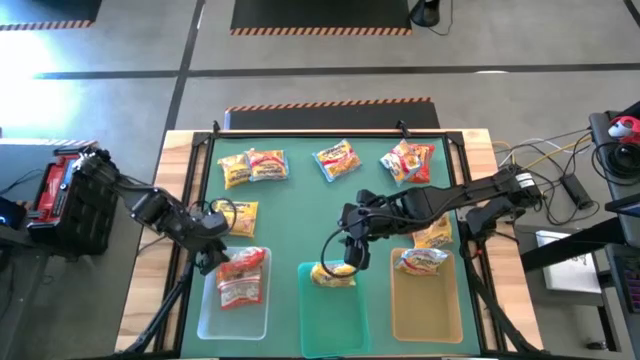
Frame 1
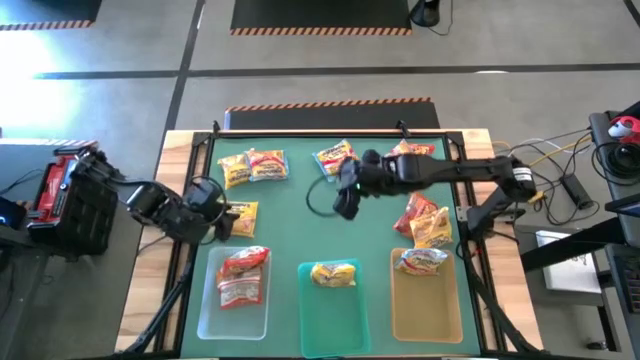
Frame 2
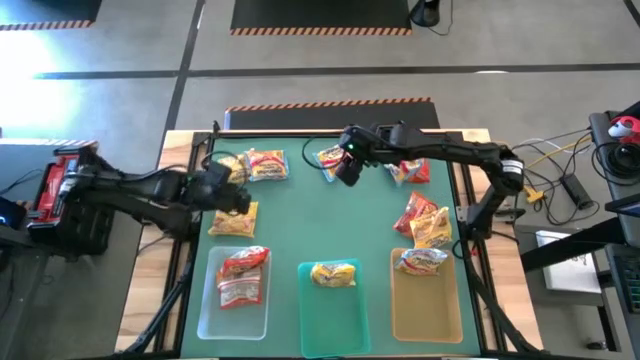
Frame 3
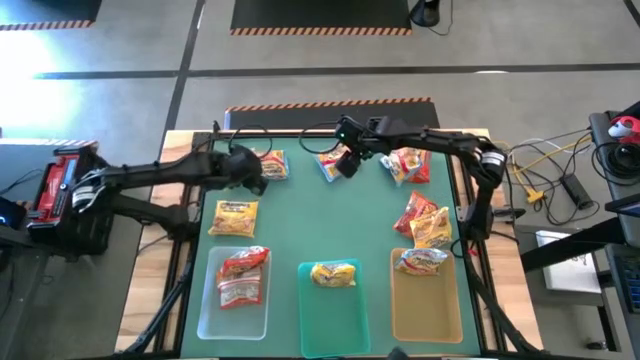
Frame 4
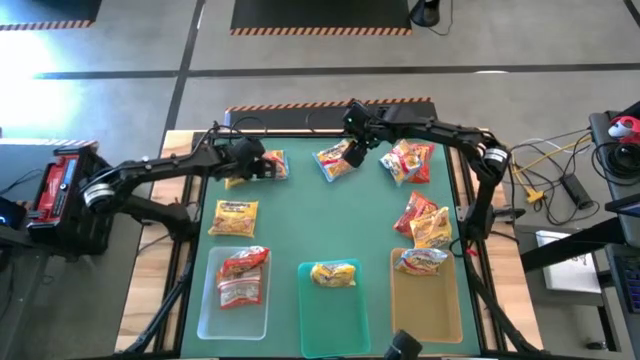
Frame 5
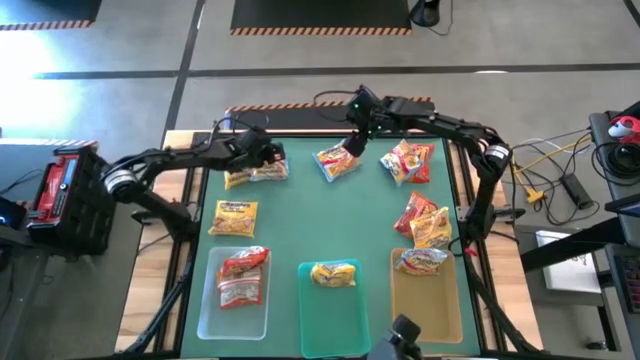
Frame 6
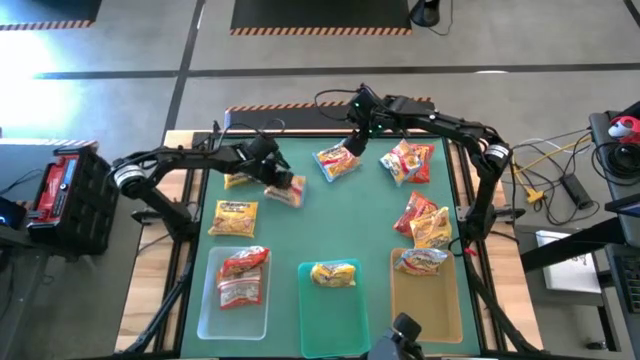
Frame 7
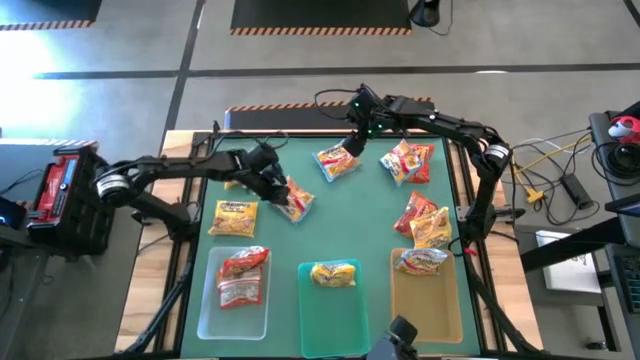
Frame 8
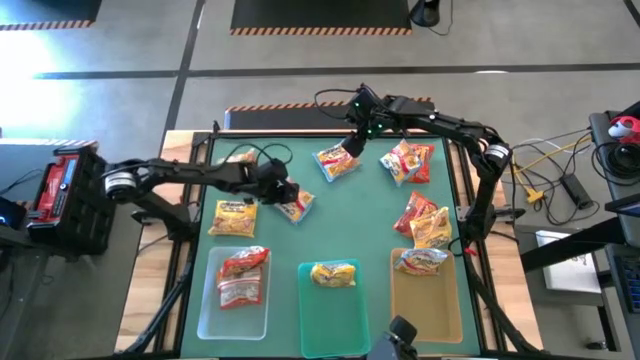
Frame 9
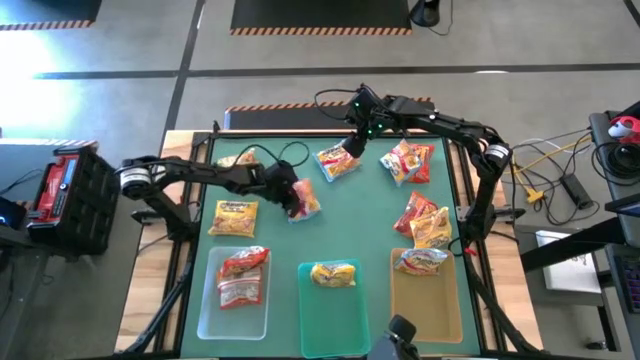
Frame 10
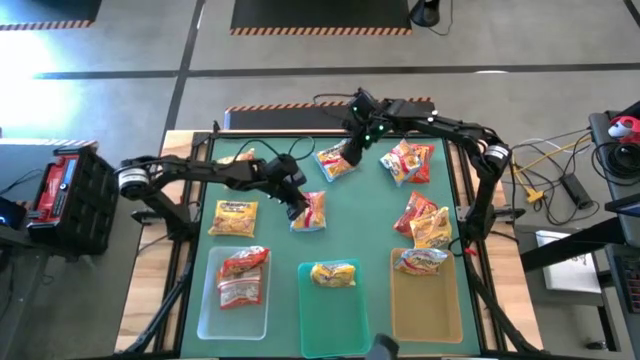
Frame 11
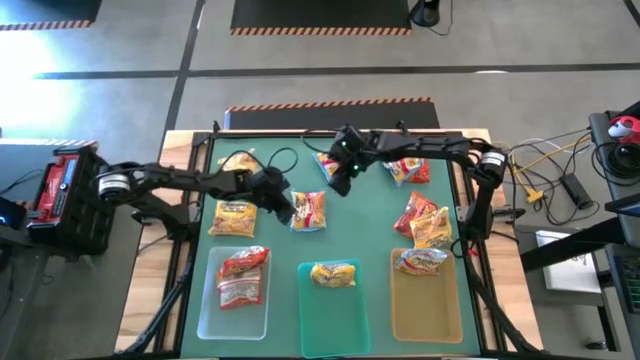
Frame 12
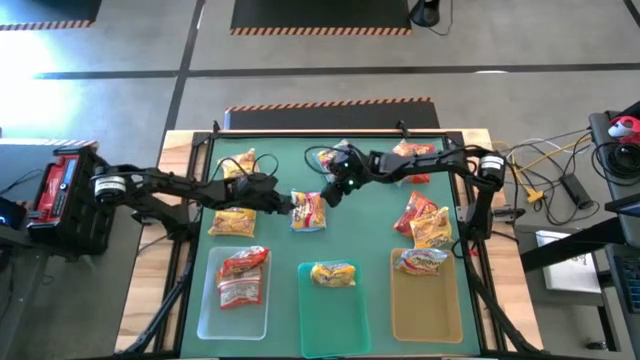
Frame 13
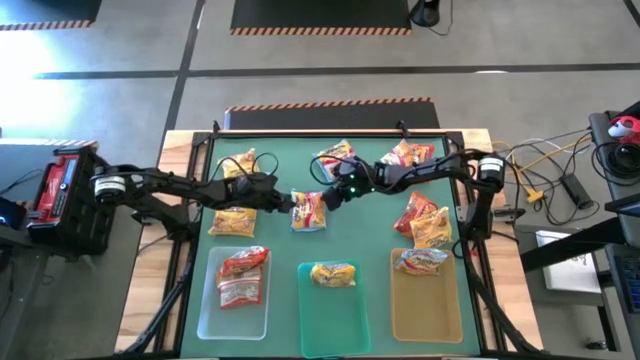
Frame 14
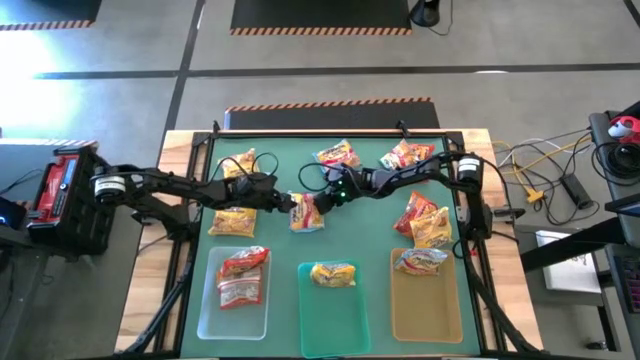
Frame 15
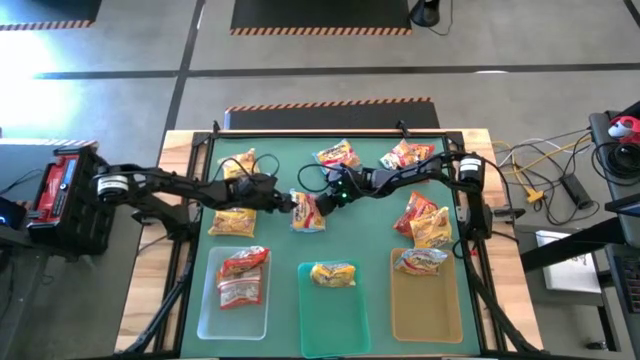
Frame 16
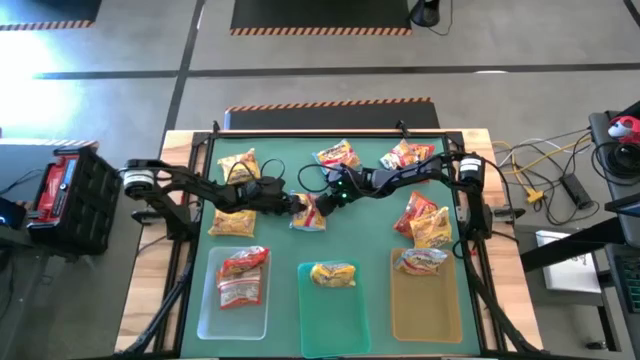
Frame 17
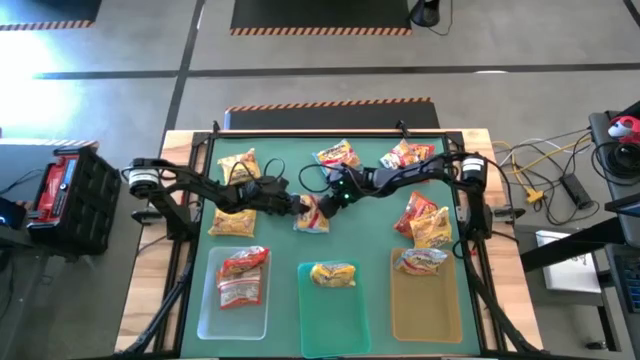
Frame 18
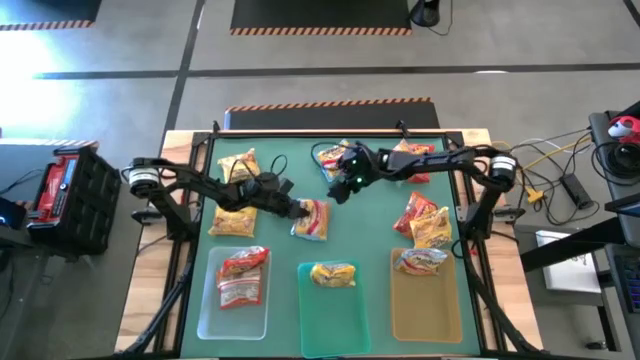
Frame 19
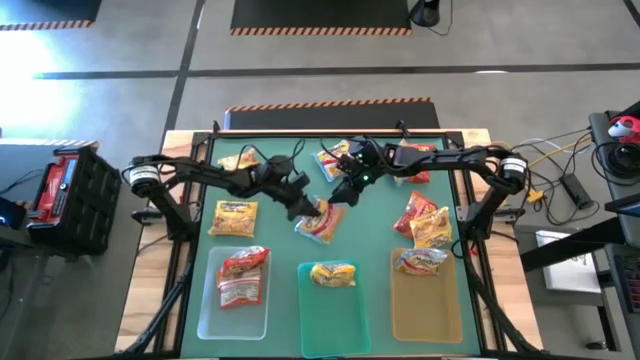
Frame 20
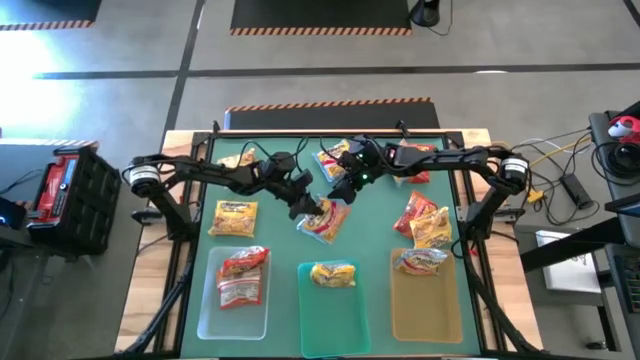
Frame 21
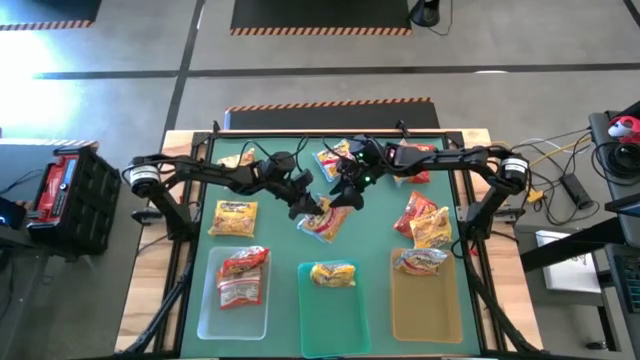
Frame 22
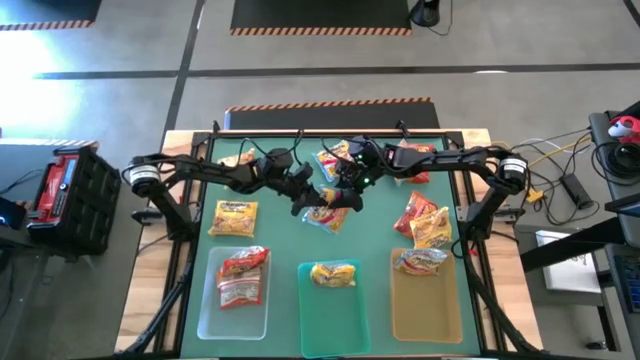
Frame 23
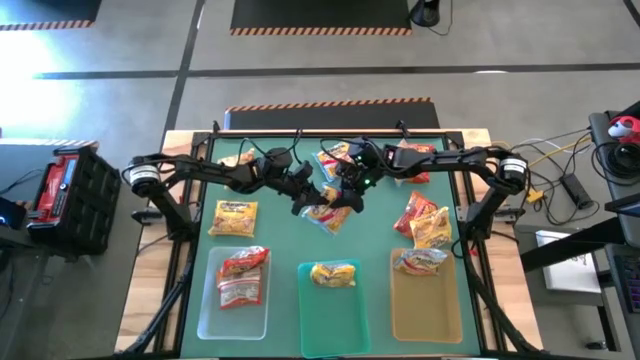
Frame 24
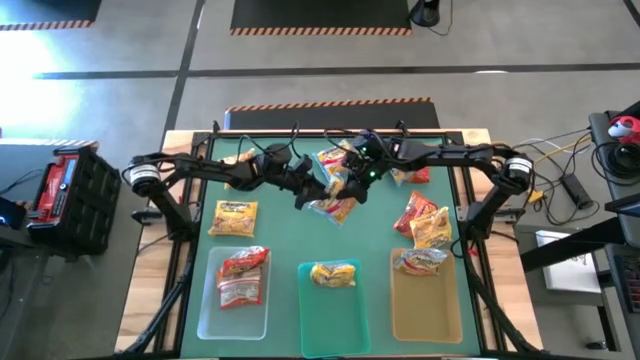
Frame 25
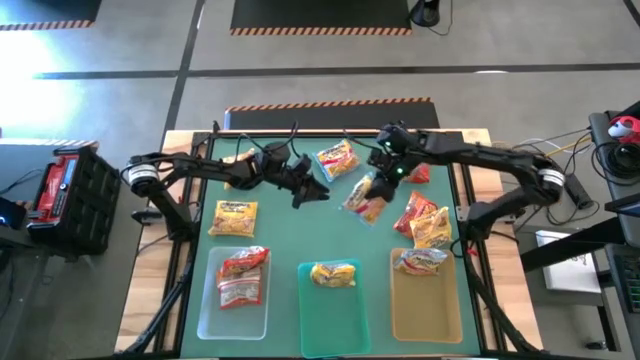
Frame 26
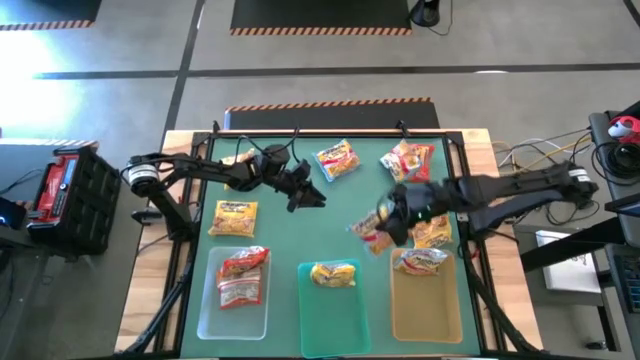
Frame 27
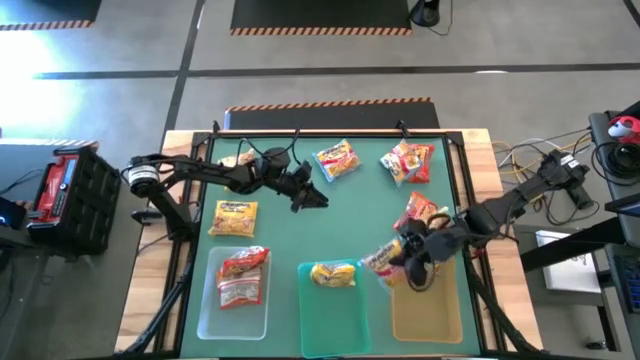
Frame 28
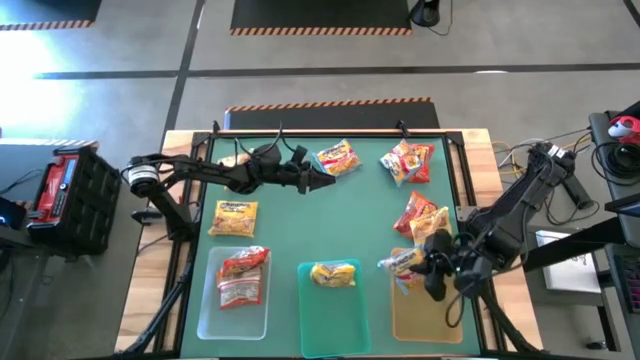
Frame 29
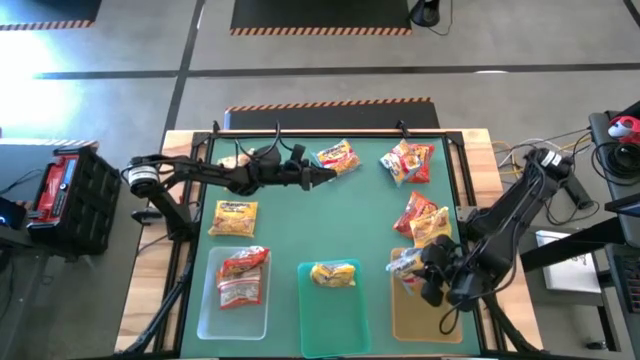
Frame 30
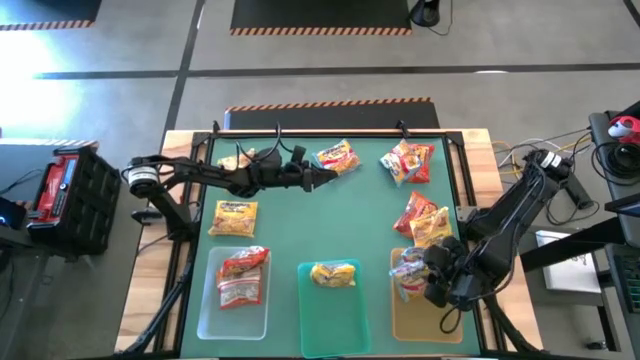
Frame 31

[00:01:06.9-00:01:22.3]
Task: Sort Maruchan noodles
Put the blue noodle pack into the yellow bin

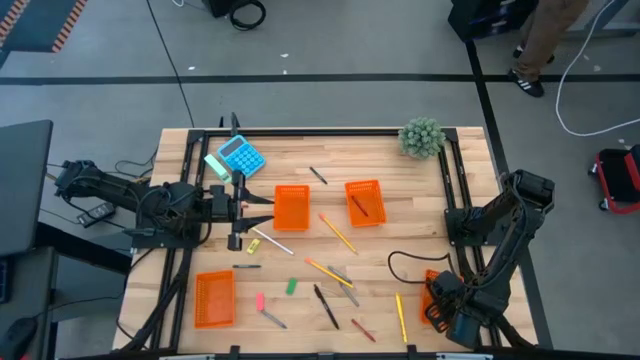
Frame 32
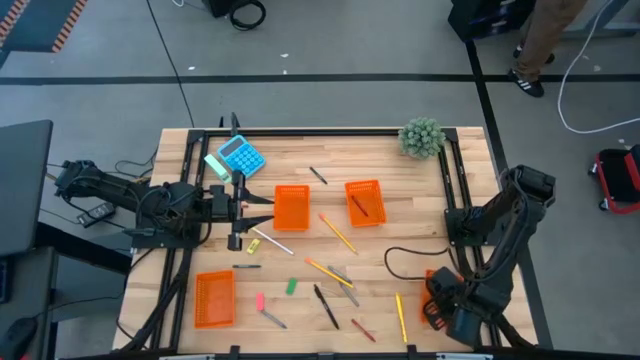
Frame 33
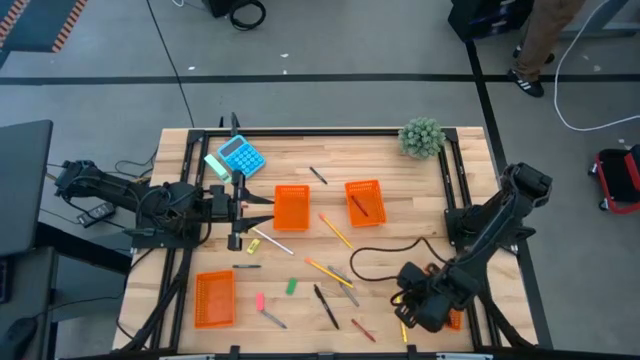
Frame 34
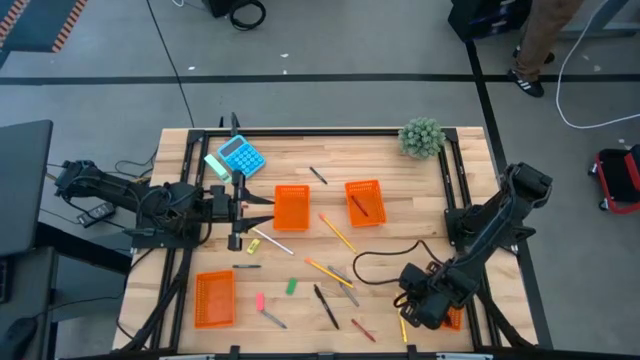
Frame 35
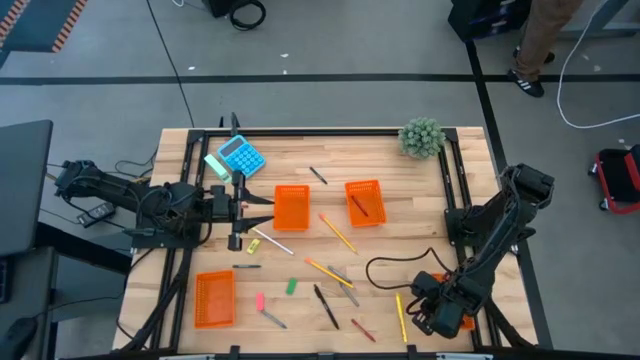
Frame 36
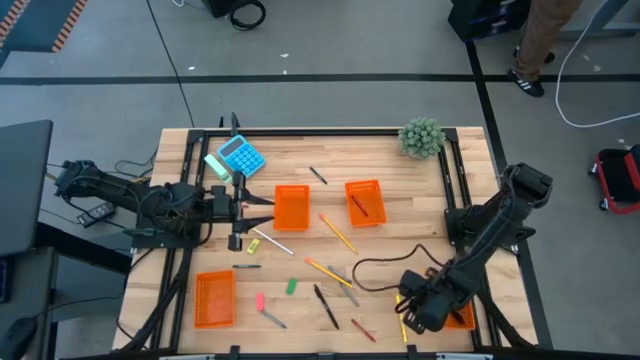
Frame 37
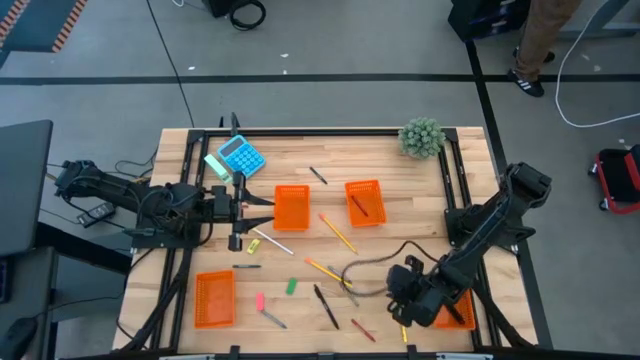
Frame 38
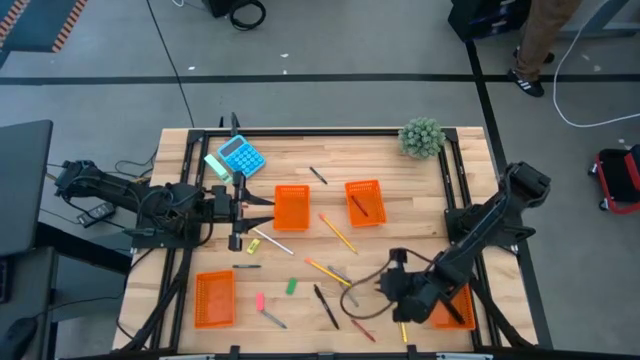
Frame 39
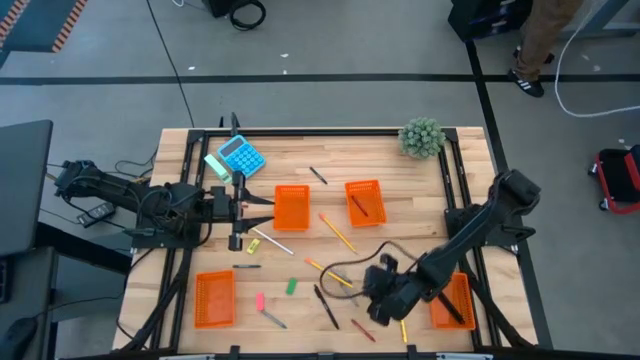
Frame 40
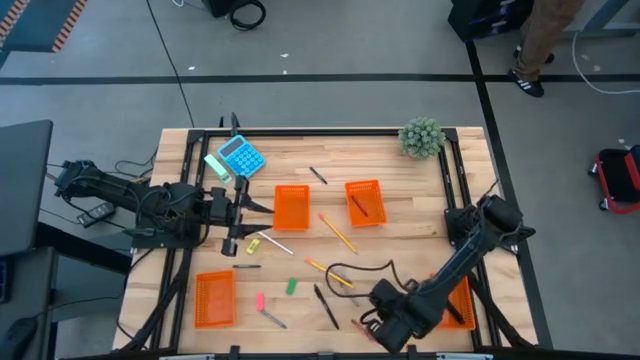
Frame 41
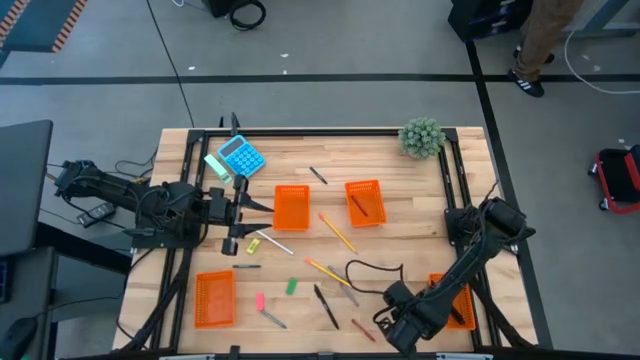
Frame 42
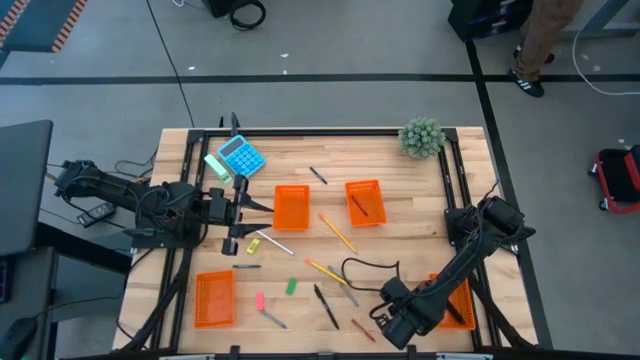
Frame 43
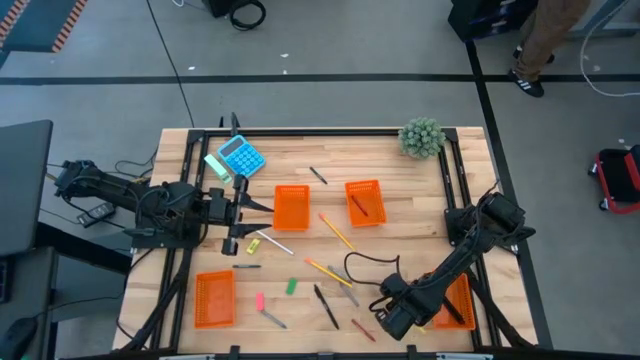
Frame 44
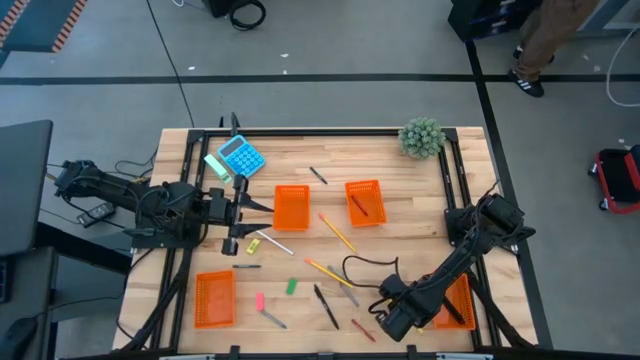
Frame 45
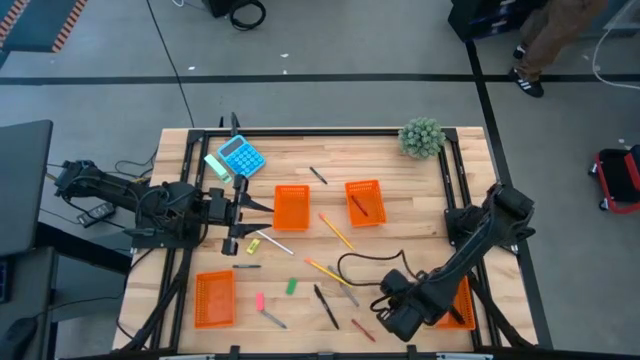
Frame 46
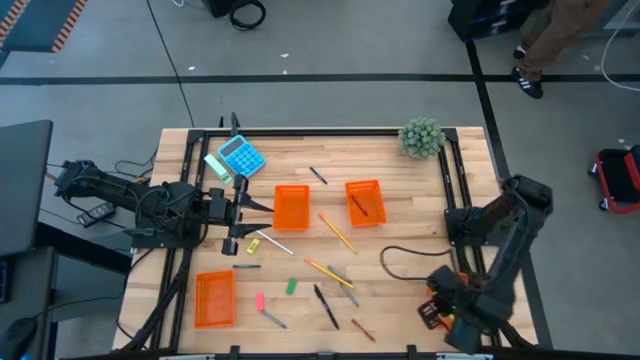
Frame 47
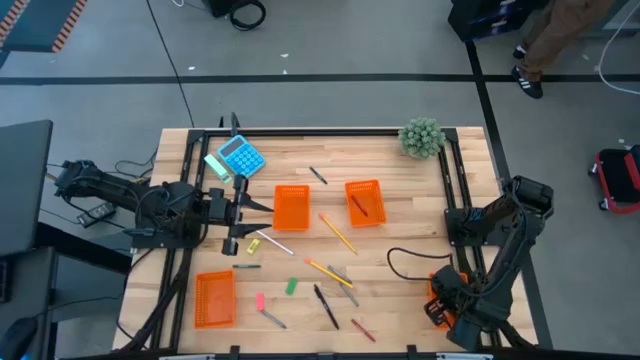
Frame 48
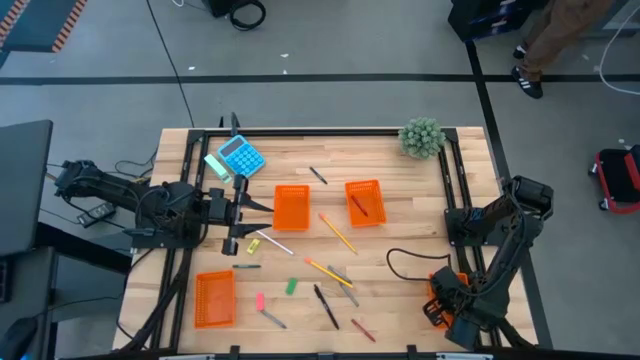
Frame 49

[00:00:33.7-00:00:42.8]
Task: Sort crayons/erasers/pens/pencils in bins
Put the yellow pen into the bottom right orange bin
